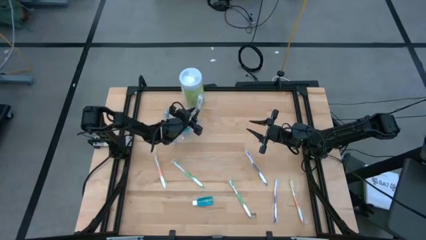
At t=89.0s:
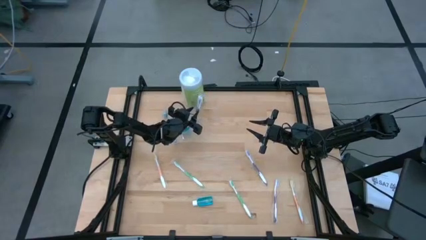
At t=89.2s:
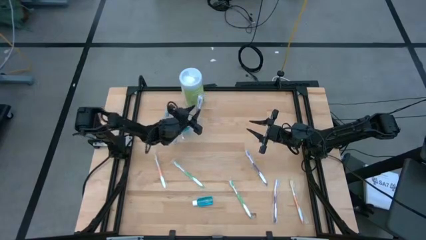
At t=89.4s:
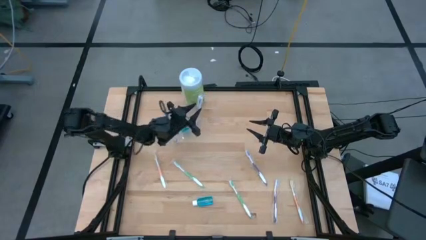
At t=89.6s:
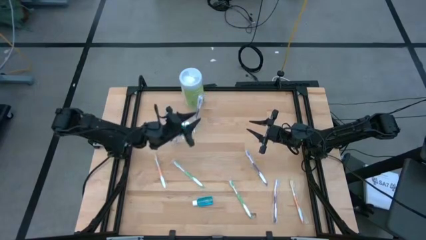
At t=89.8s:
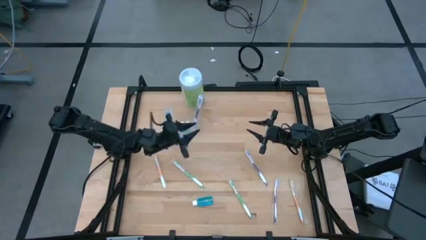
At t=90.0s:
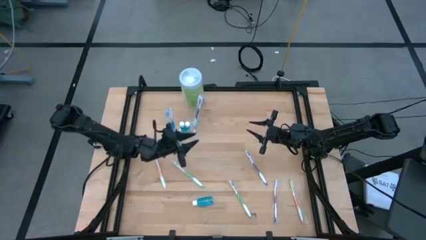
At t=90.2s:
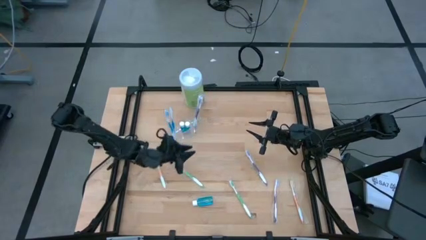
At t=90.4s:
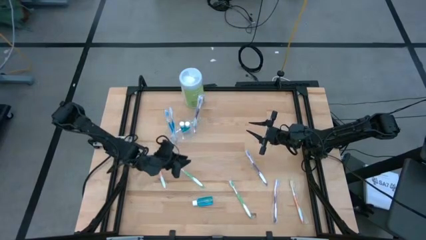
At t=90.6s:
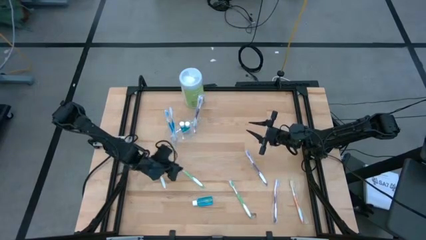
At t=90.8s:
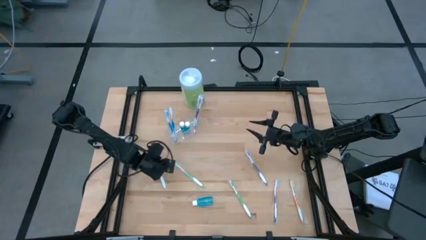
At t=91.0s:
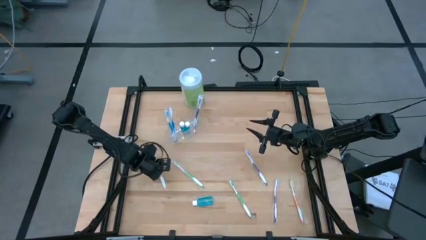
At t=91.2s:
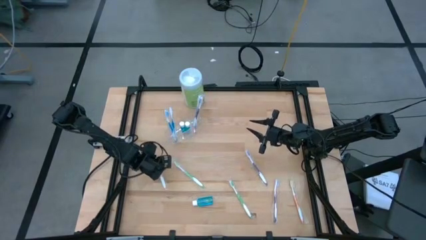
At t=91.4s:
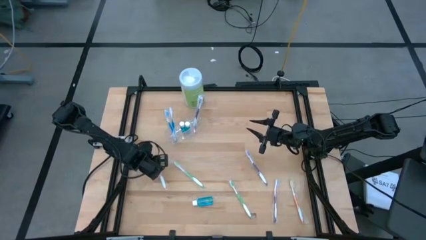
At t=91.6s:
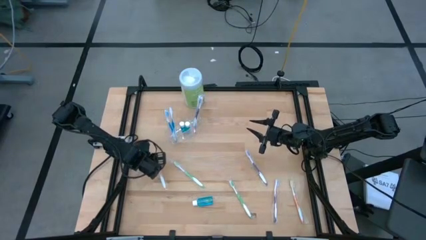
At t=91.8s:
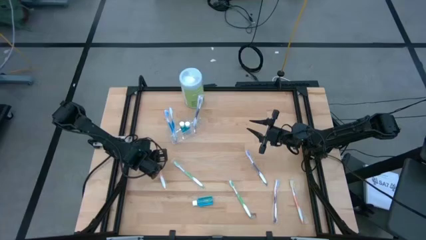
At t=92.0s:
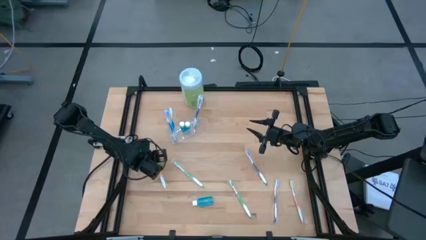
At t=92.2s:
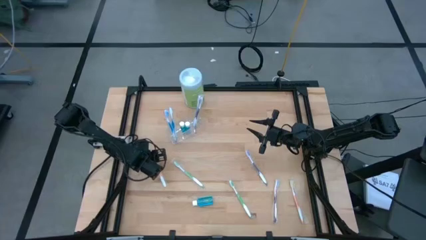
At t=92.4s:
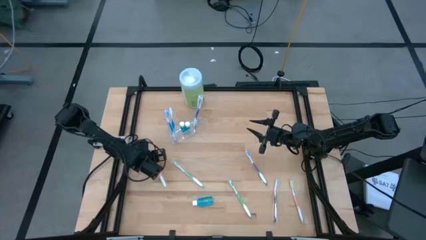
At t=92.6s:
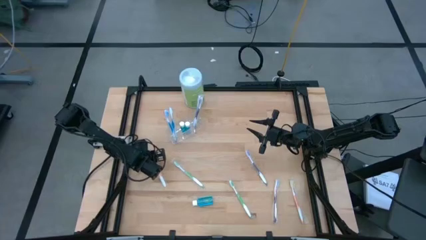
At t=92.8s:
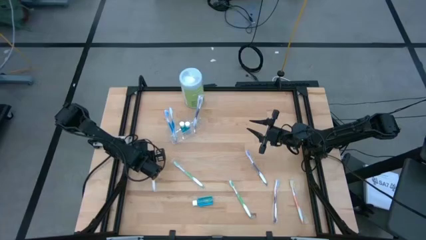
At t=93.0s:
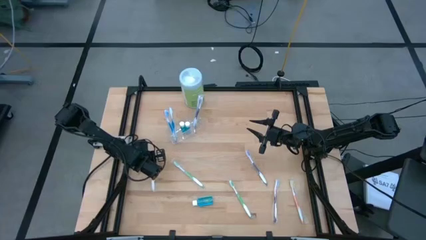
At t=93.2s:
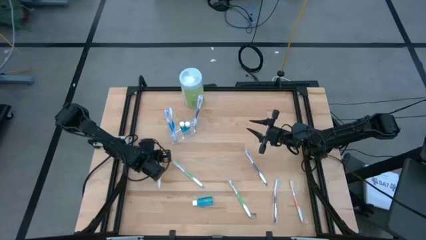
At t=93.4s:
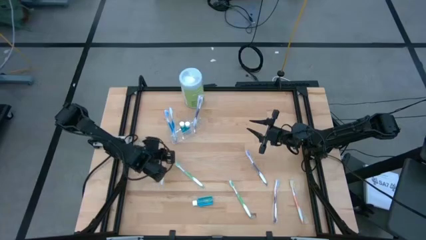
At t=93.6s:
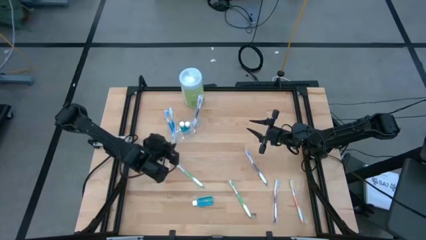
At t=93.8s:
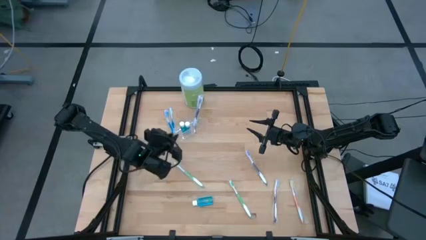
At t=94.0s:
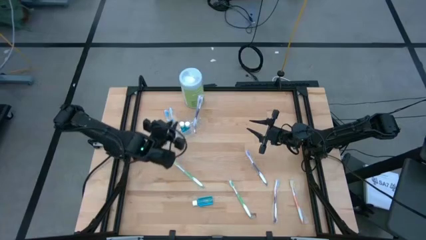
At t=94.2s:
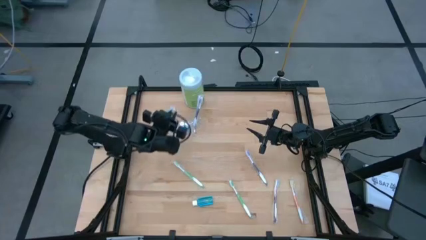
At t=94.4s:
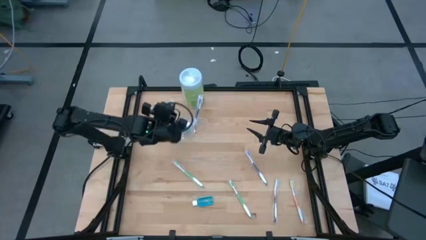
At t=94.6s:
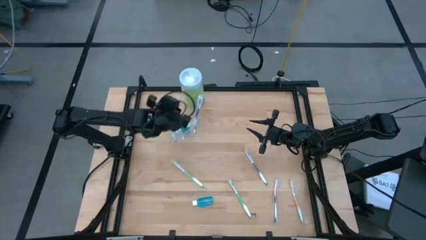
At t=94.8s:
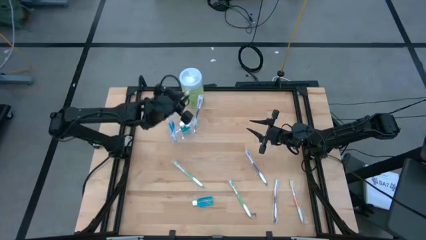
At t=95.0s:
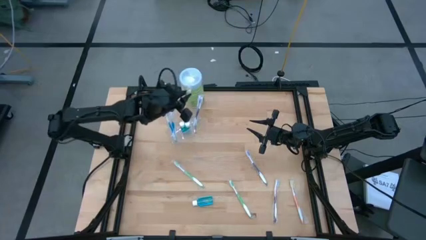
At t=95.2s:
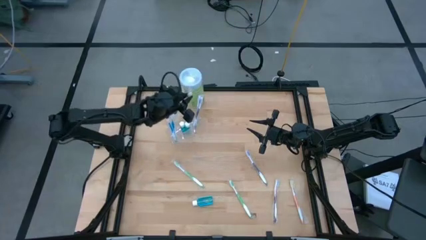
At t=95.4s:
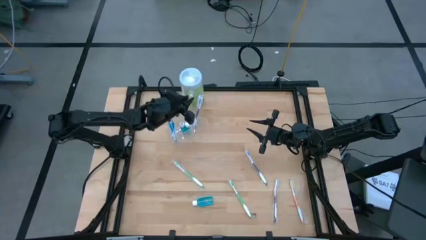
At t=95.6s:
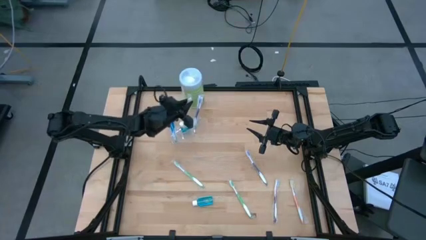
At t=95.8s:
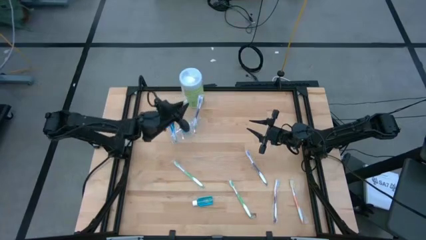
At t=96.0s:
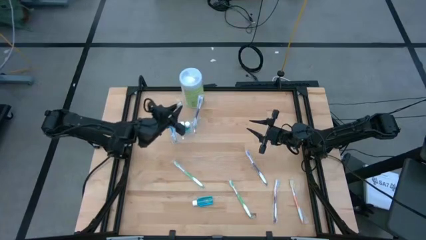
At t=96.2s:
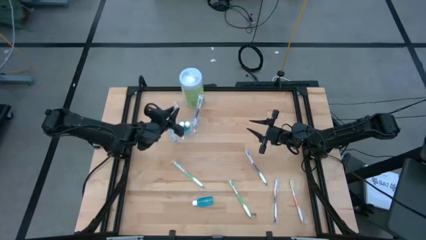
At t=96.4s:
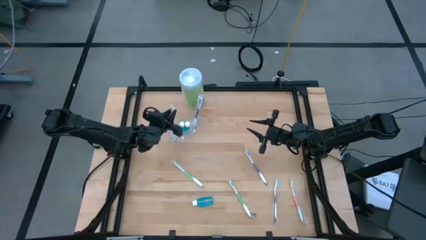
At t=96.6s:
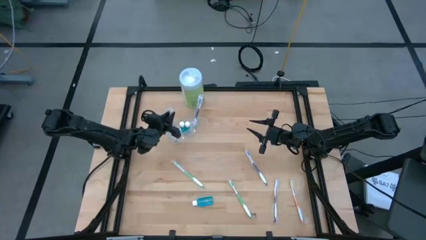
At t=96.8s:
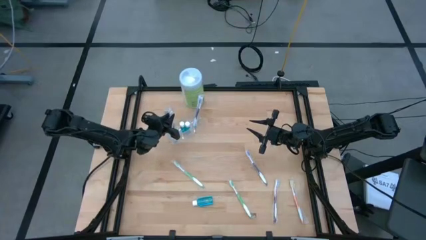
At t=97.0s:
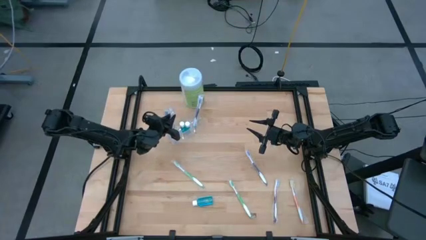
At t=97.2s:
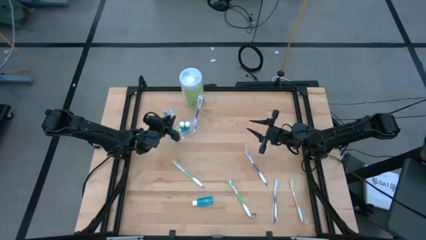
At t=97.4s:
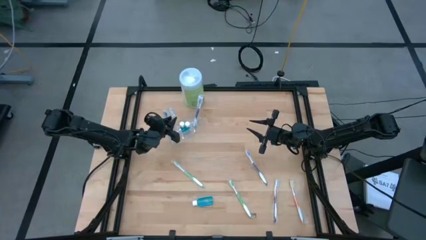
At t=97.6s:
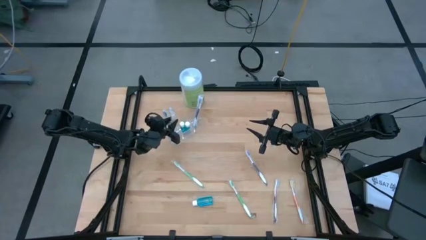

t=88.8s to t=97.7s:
Task: Pick & Place toothbrushing station
Put the orange toothbrush into the transparent organizer

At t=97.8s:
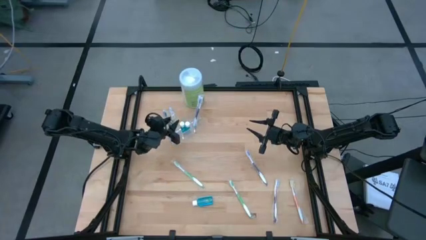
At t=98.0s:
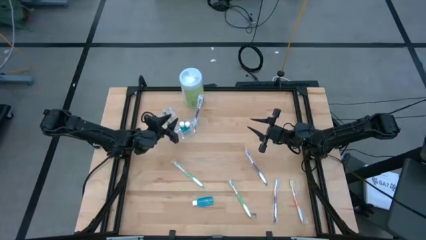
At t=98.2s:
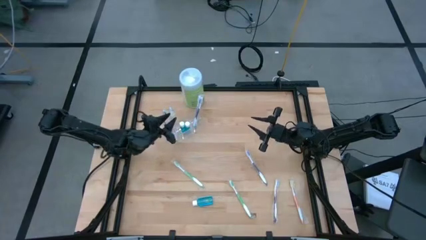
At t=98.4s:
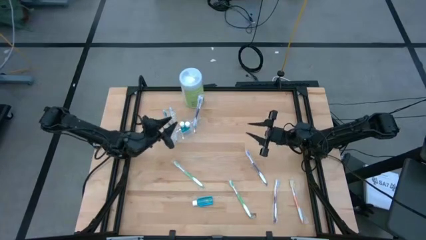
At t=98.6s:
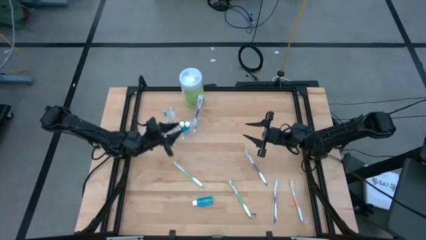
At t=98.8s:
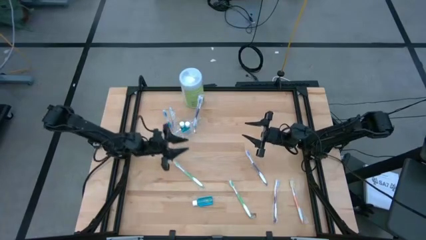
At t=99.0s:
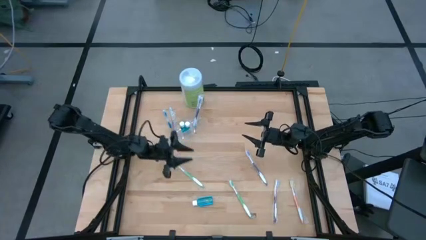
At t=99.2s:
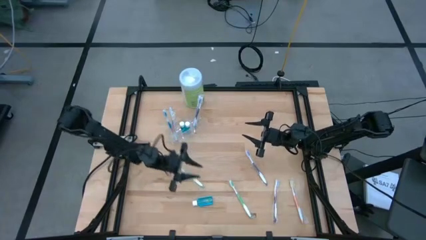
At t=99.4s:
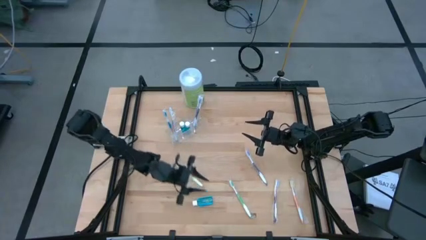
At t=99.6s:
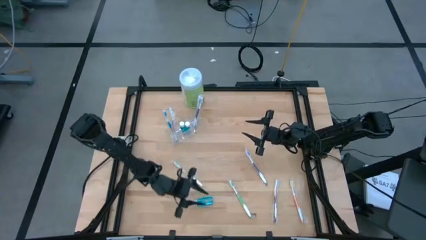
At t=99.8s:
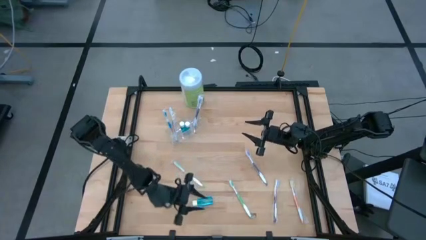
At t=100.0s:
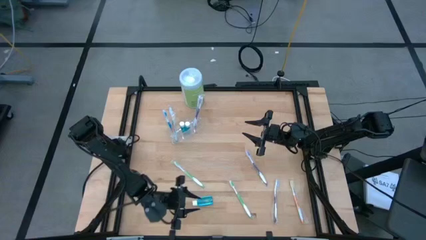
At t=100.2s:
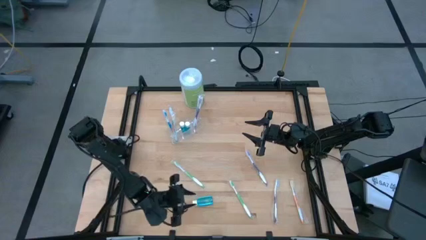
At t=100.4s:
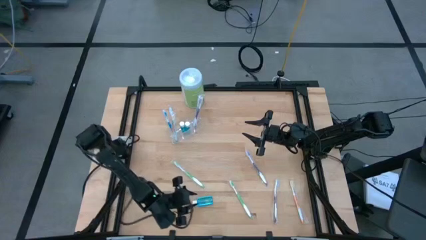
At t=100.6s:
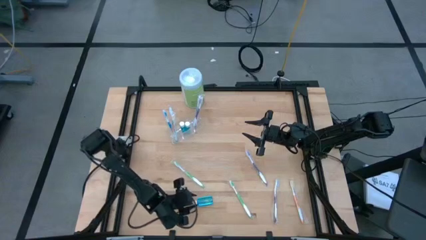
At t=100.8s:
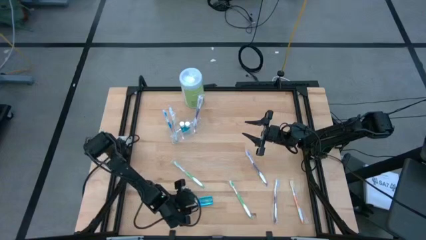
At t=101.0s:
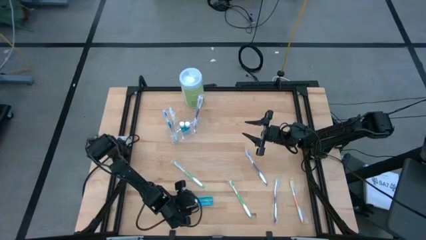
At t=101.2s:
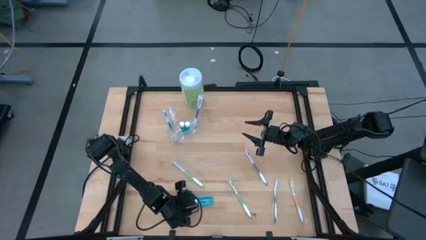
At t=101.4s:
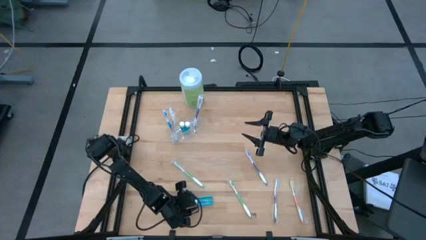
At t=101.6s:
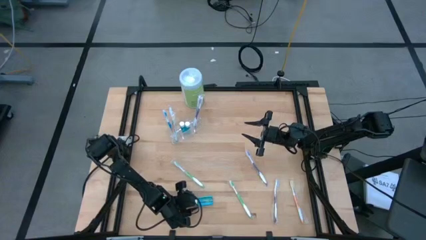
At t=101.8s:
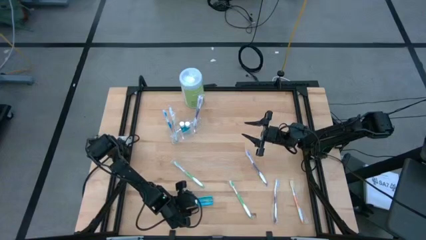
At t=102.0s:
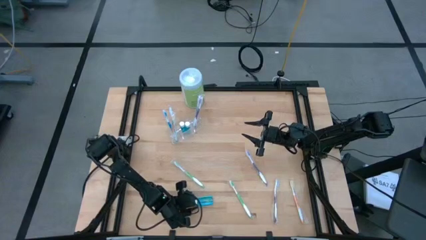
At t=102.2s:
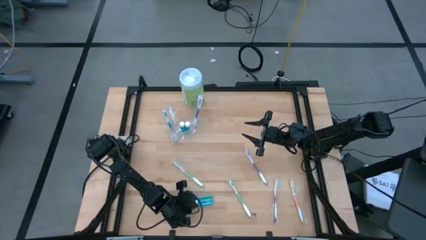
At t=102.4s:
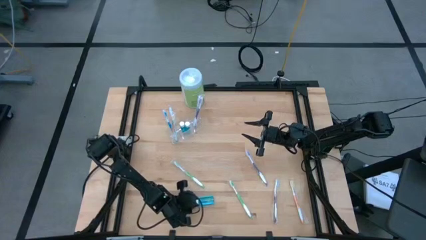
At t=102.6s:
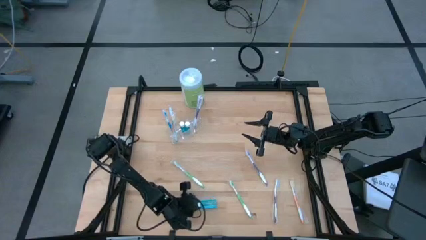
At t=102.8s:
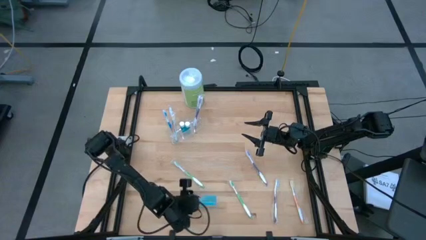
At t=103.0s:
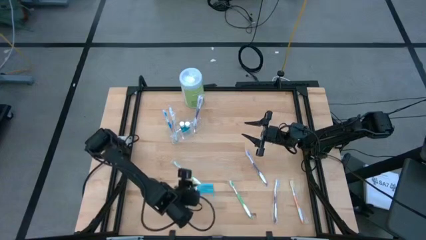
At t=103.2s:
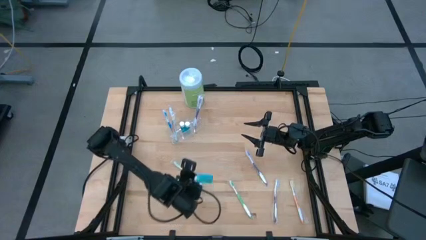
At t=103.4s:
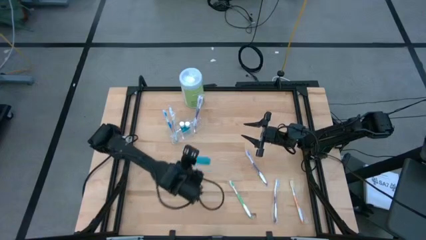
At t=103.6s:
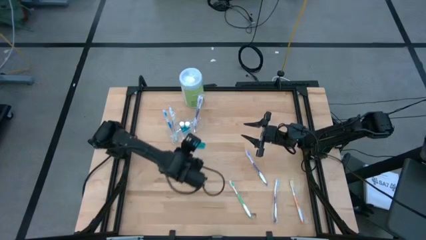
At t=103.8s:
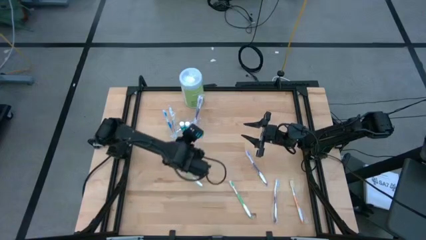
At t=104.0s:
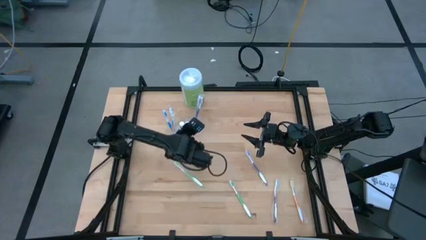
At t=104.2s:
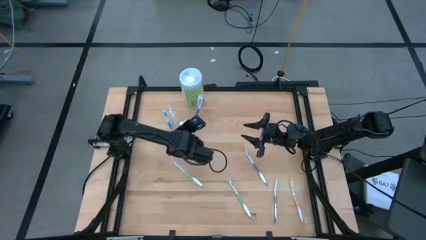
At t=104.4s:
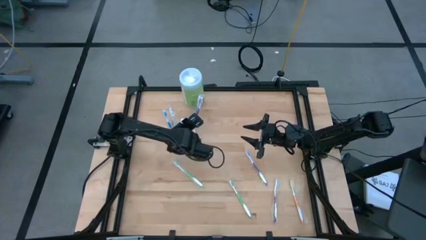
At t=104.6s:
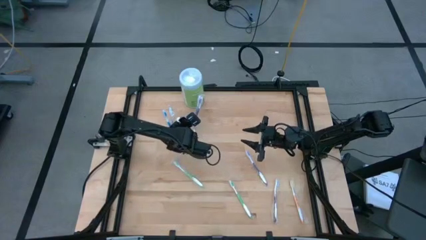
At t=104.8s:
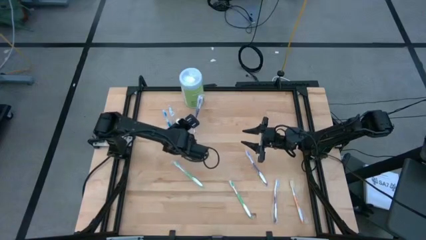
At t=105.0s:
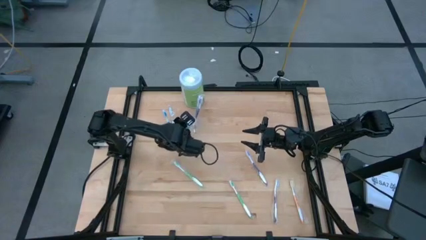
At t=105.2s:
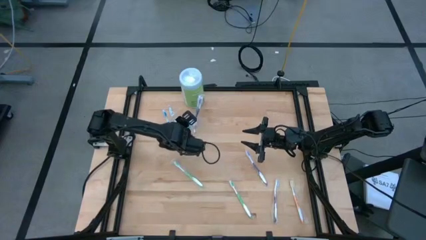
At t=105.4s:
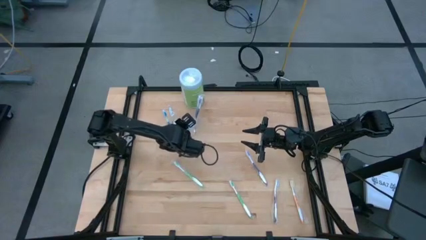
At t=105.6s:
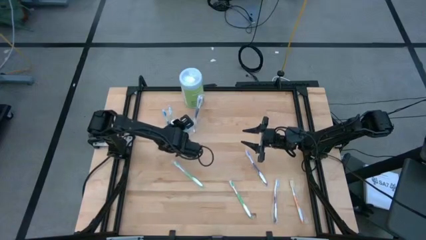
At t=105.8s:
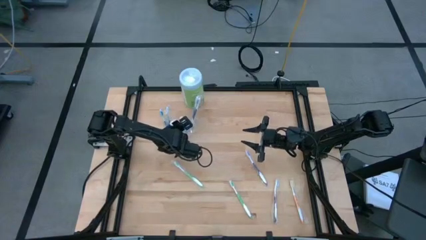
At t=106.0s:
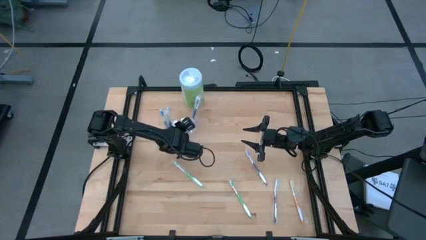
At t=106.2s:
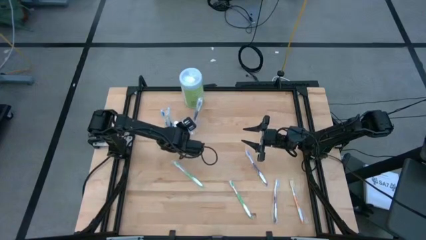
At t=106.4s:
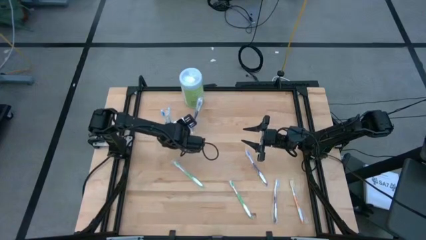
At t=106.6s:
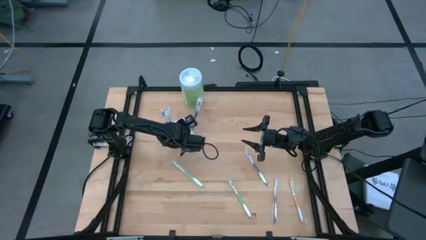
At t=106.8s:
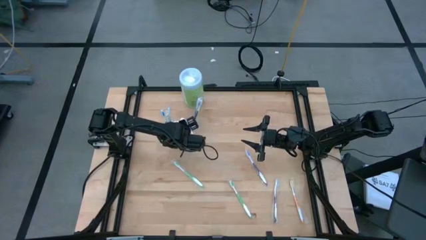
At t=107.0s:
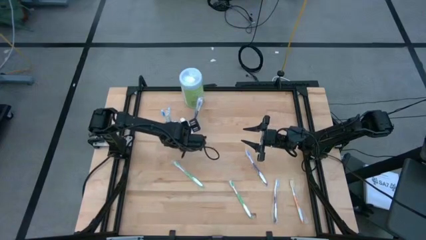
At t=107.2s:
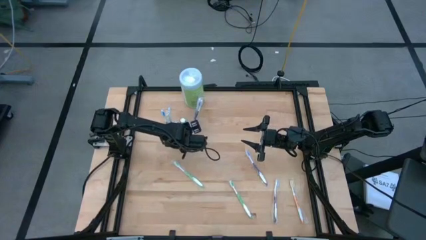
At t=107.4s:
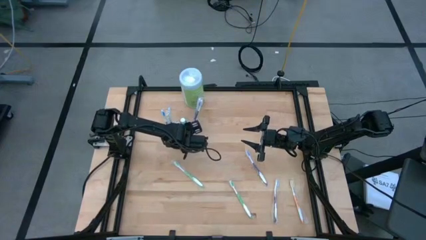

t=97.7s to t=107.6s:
Put the mouthwash into the transparent organizer
